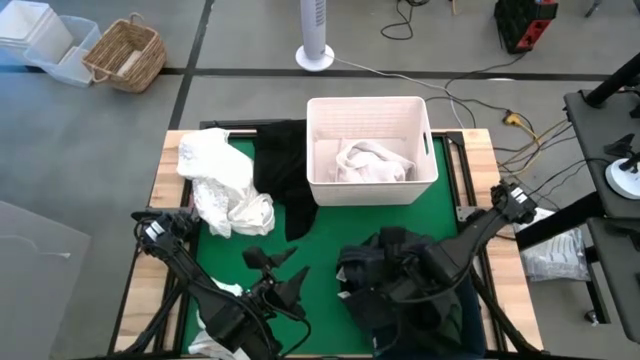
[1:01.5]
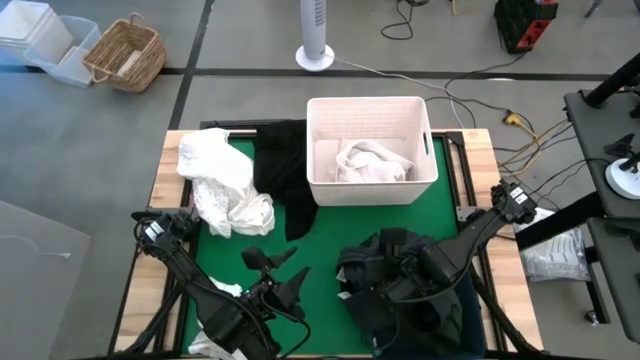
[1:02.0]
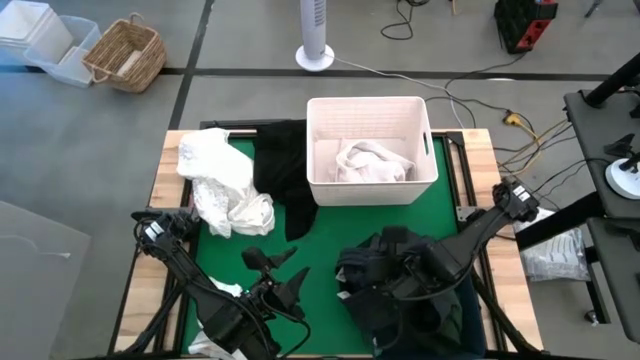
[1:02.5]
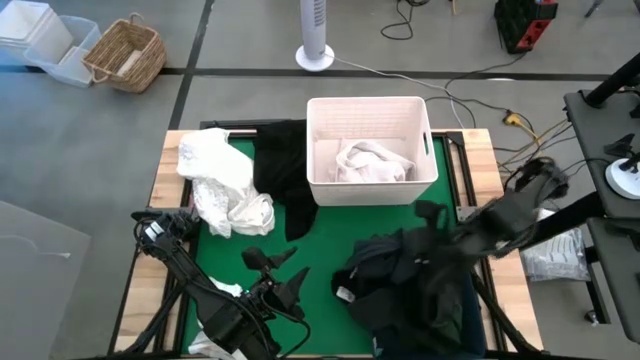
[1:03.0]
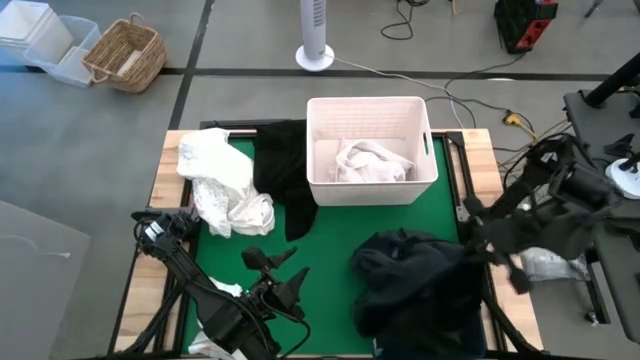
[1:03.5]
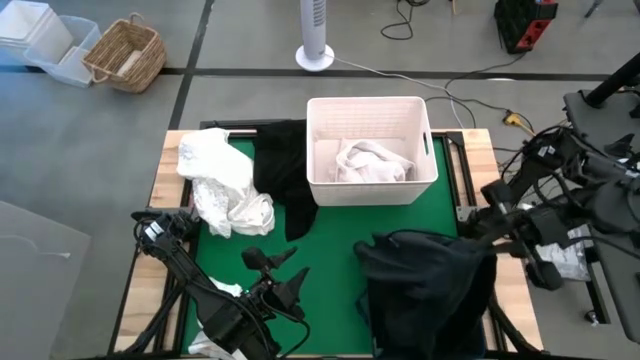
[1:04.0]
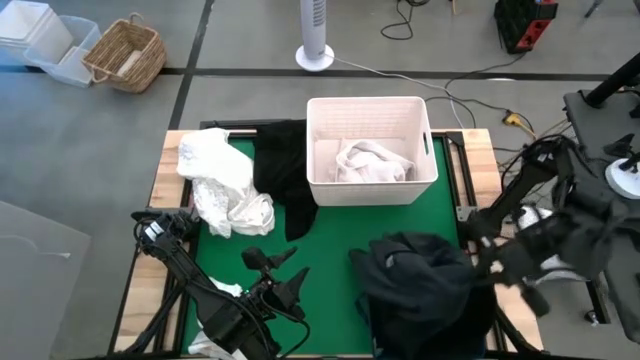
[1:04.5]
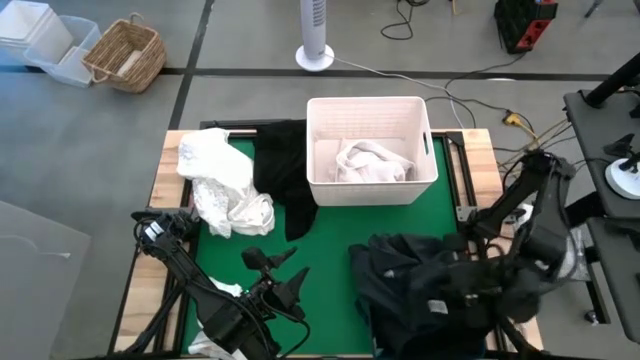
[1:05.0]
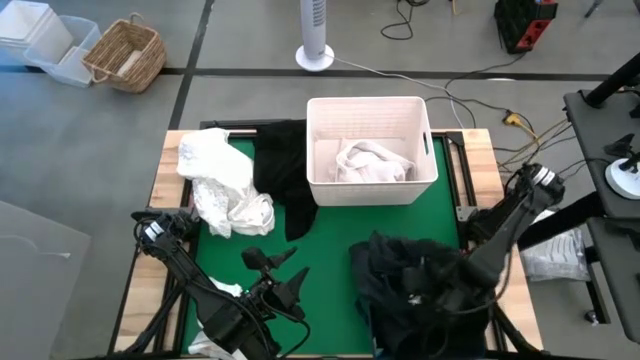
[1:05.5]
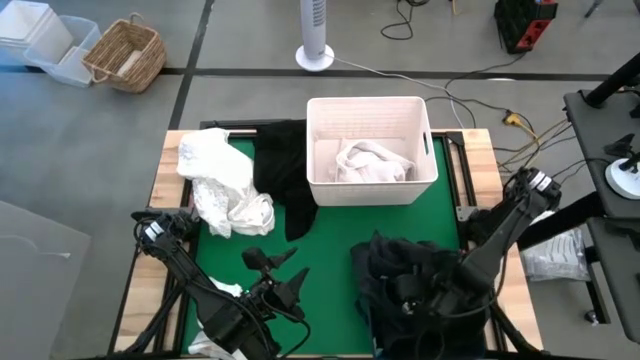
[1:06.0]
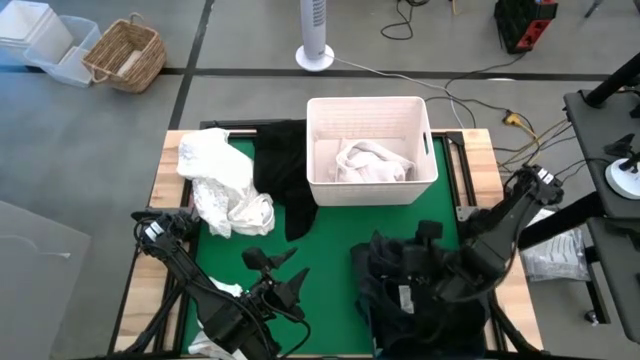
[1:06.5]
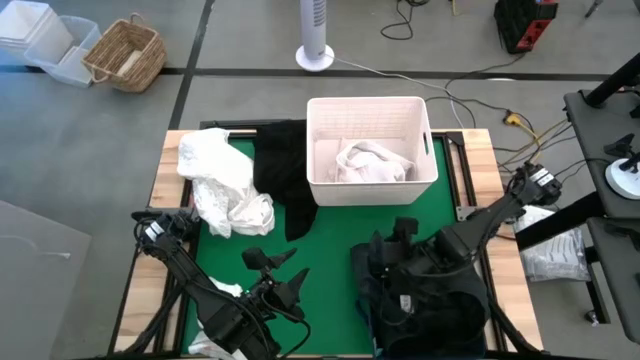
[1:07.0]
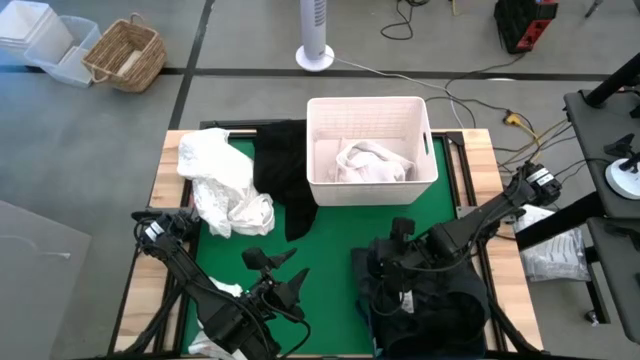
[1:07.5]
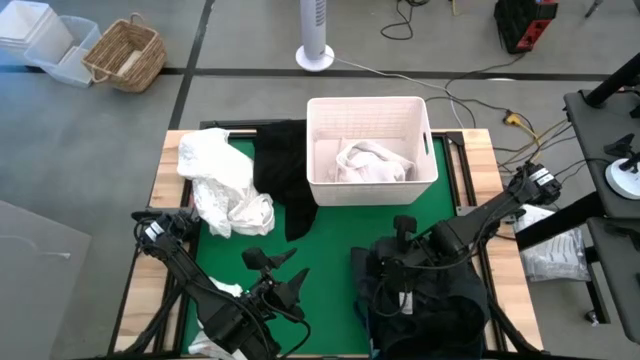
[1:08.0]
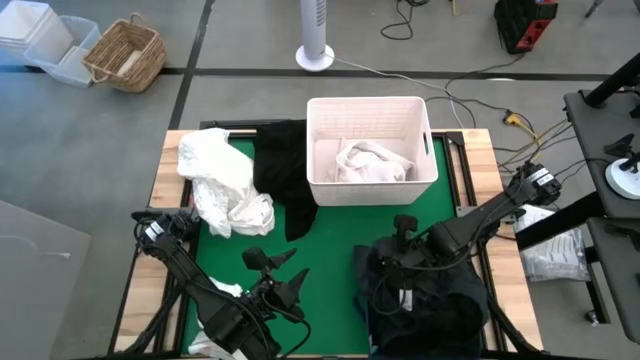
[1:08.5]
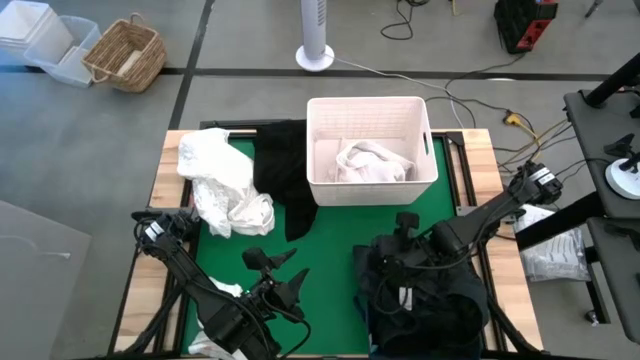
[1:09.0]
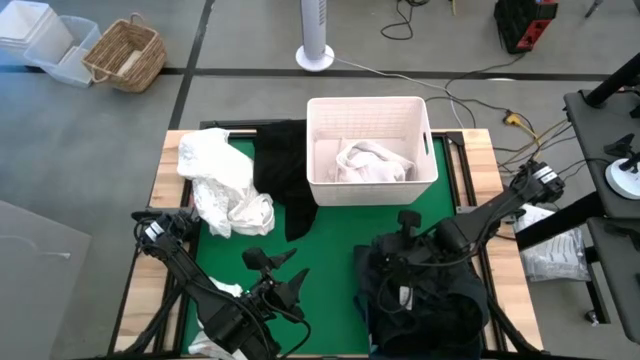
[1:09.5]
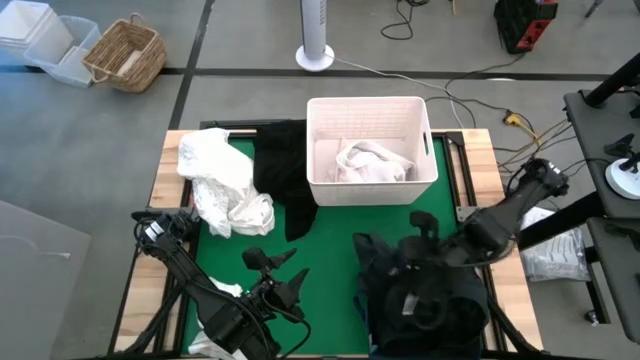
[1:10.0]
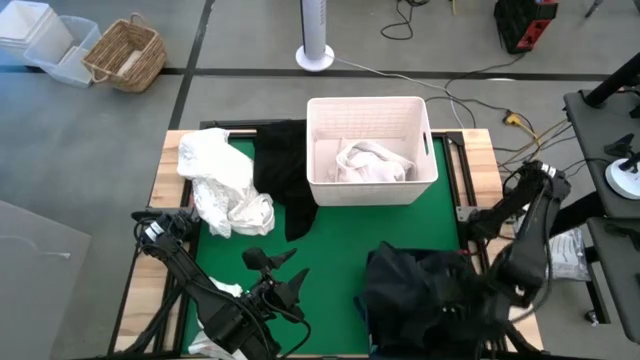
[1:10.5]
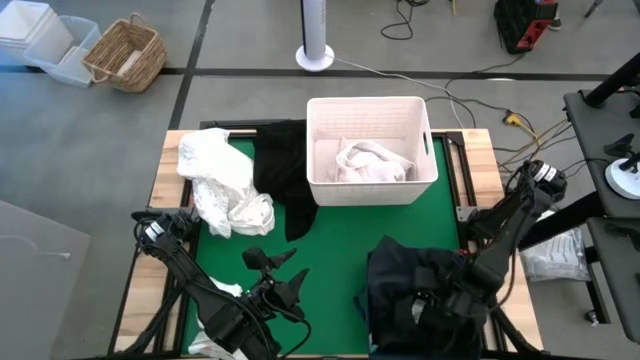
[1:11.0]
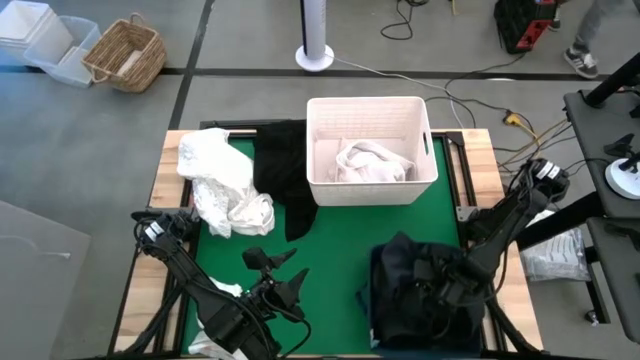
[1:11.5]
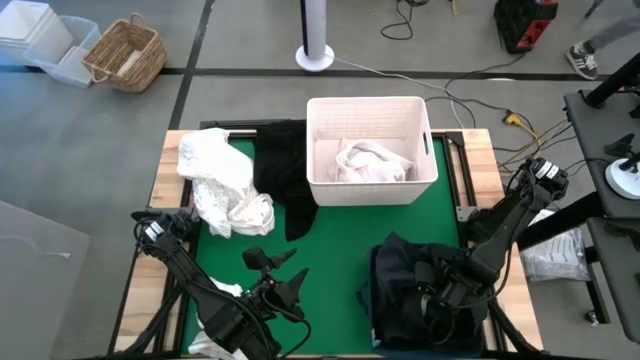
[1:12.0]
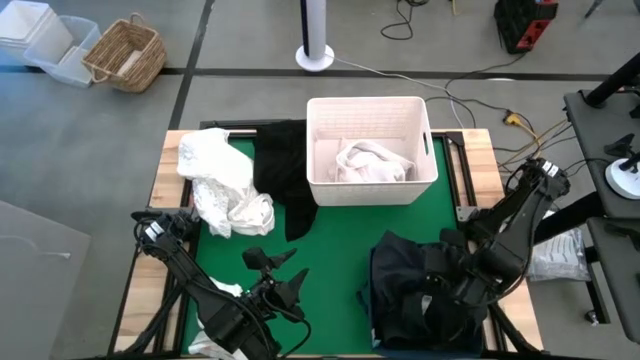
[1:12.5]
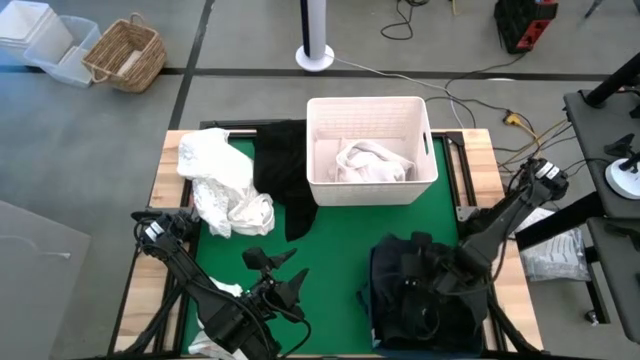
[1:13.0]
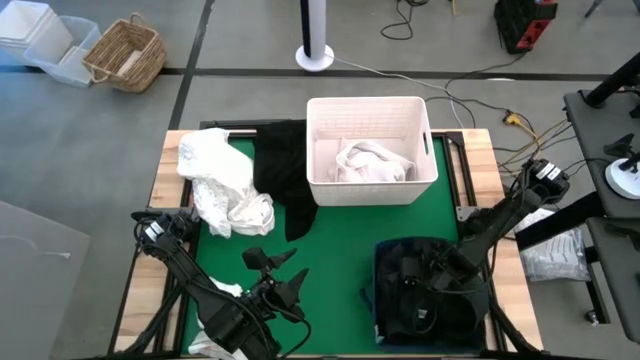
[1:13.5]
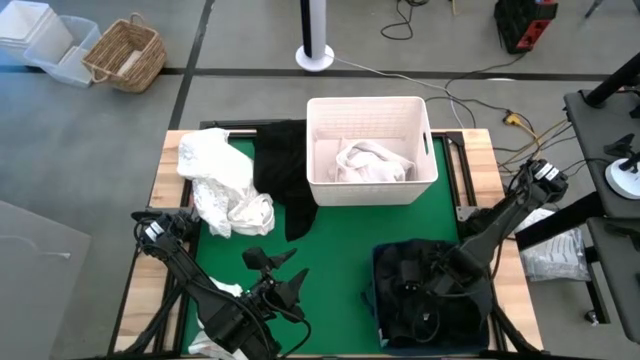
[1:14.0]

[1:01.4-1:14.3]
Put the black shorts into the blue laundry bin

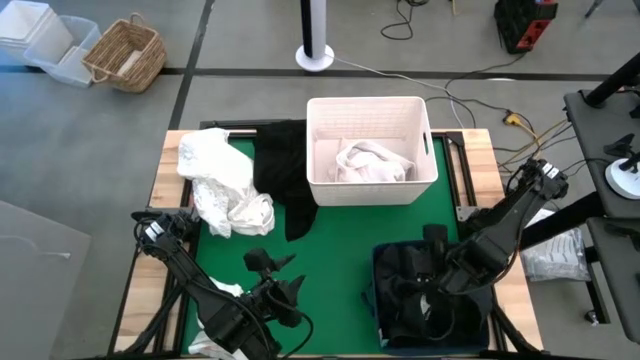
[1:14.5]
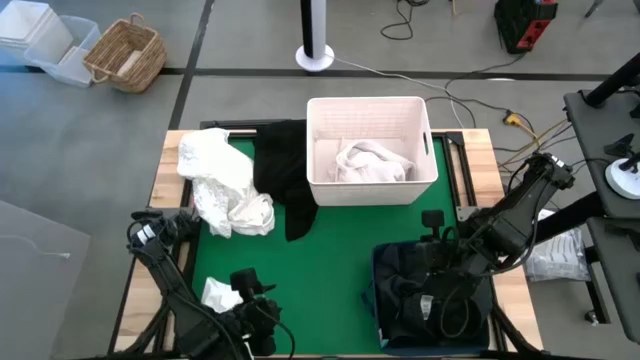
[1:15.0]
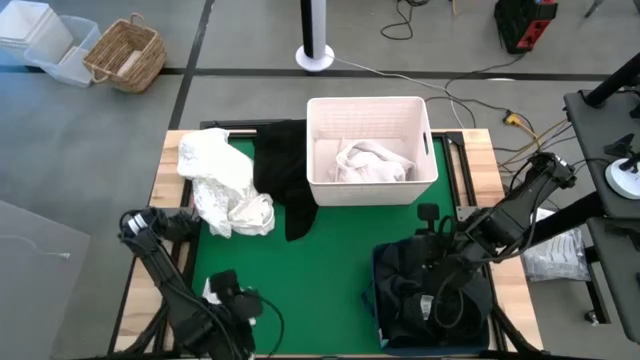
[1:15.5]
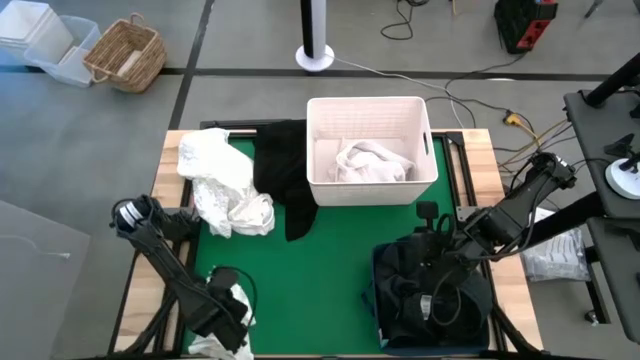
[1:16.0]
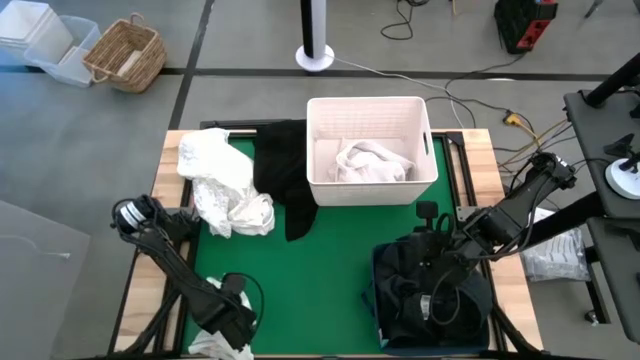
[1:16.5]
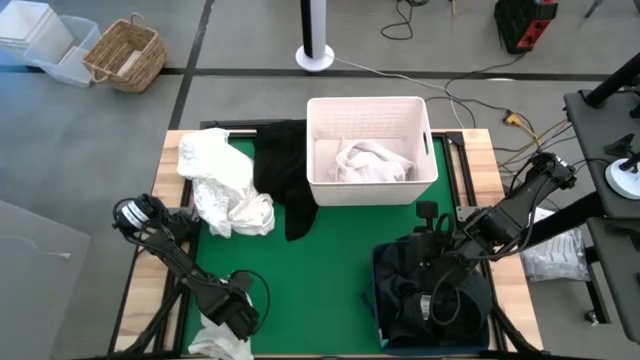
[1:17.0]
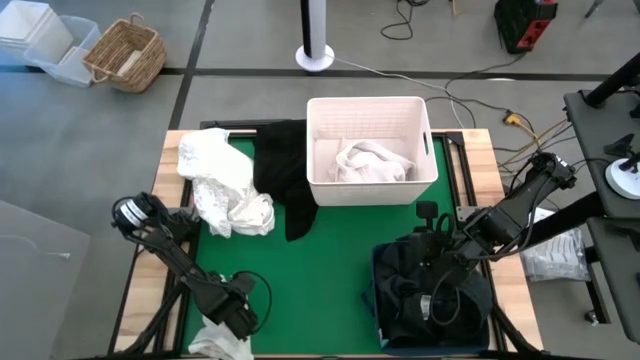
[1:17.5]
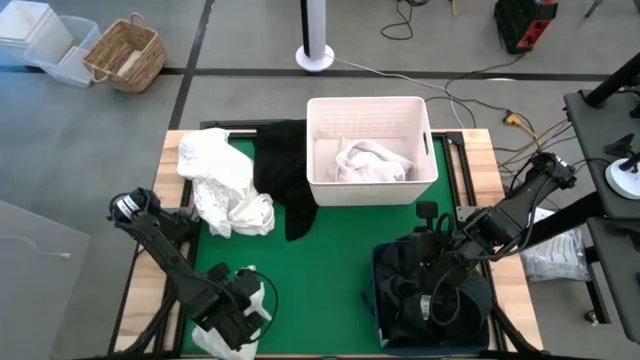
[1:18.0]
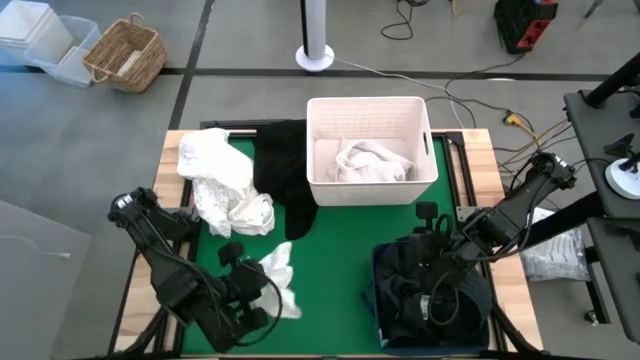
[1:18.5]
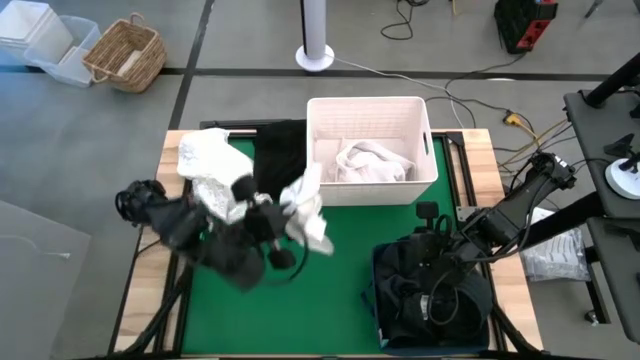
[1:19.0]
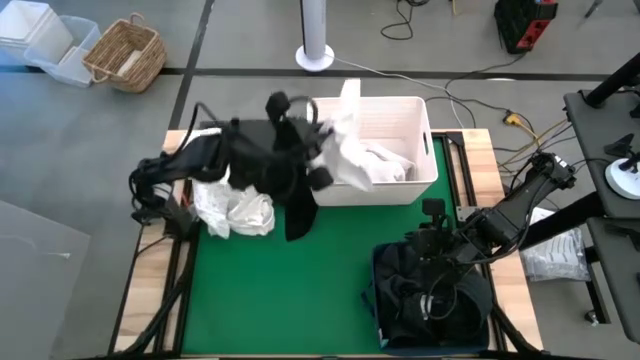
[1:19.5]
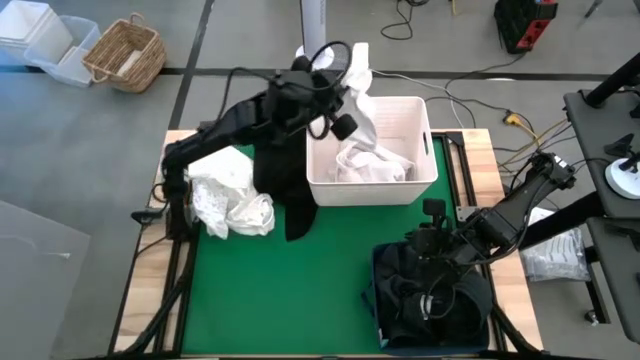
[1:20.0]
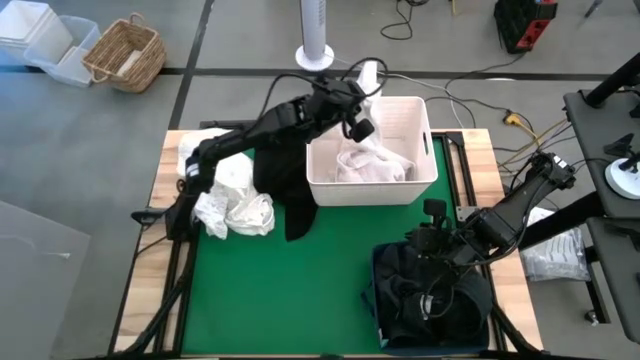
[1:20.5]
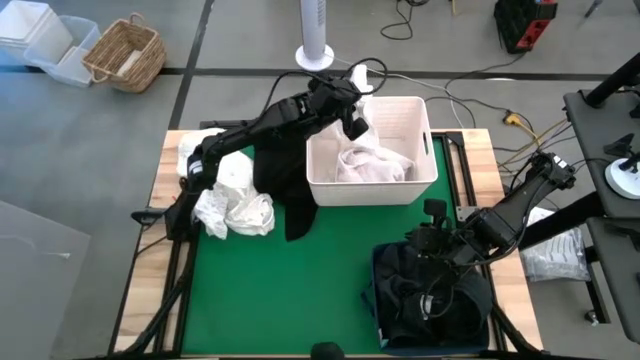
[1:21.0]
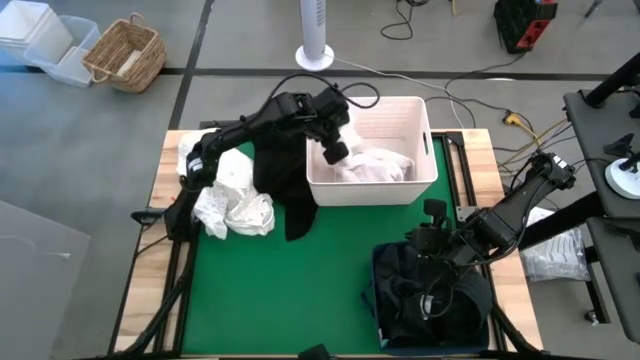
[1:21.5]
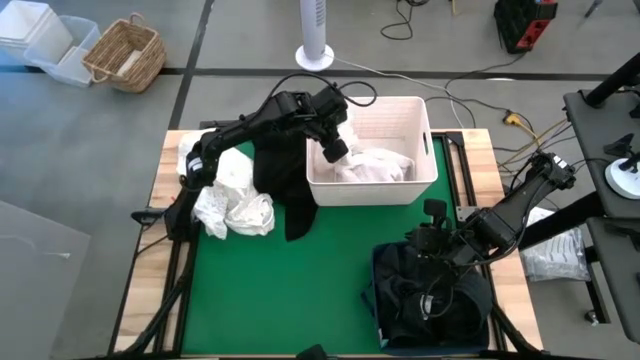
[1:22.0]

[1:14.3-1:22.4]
Put the white shirt into the white laundry bin
